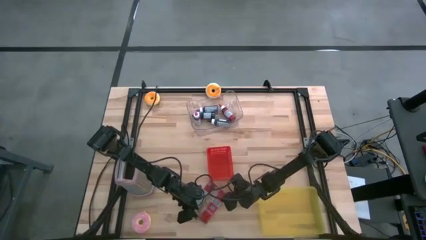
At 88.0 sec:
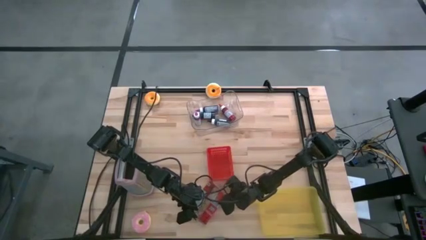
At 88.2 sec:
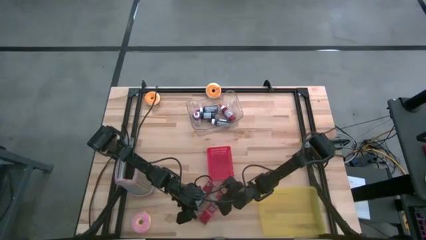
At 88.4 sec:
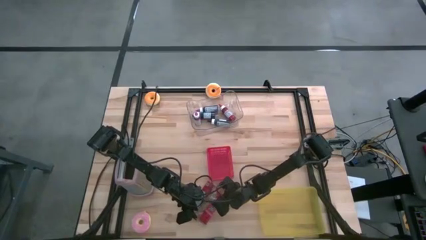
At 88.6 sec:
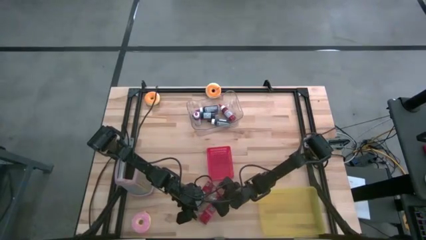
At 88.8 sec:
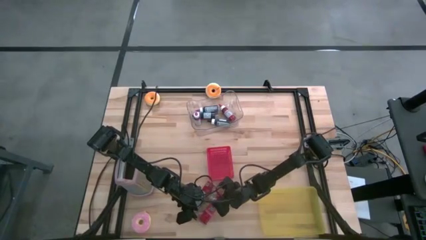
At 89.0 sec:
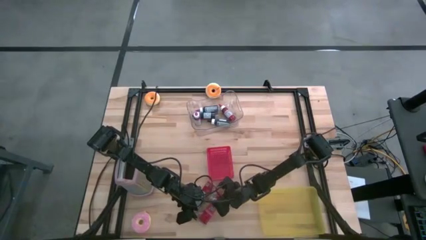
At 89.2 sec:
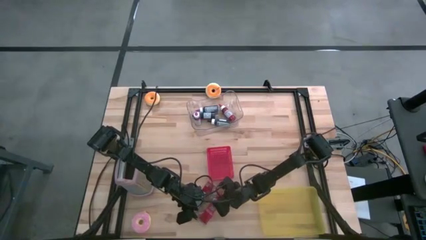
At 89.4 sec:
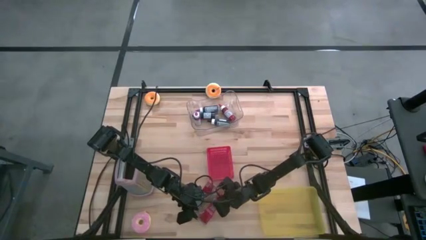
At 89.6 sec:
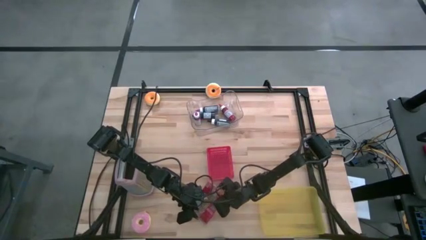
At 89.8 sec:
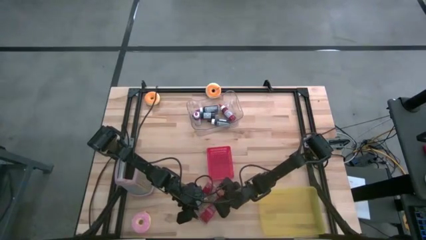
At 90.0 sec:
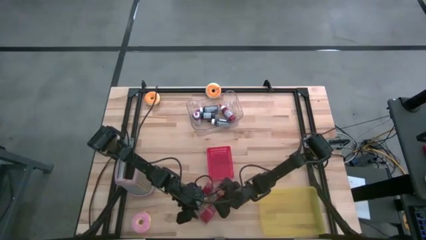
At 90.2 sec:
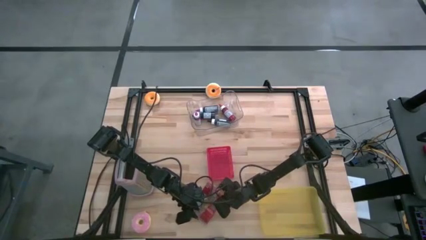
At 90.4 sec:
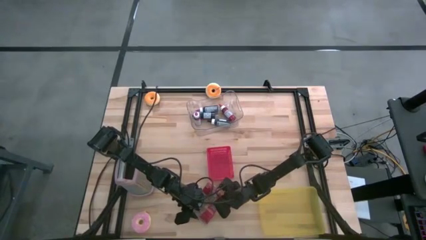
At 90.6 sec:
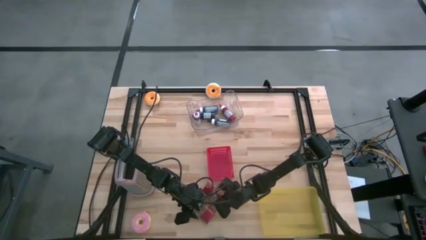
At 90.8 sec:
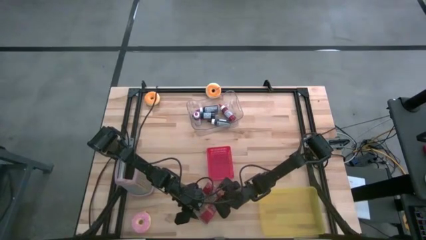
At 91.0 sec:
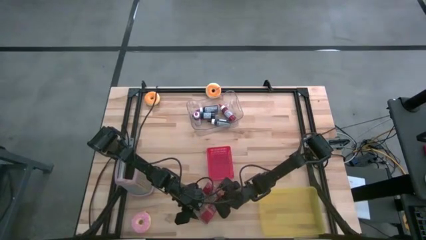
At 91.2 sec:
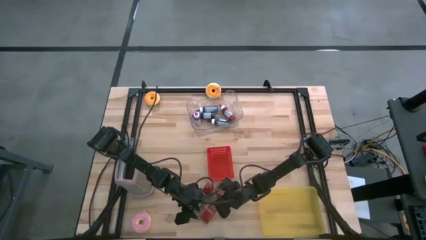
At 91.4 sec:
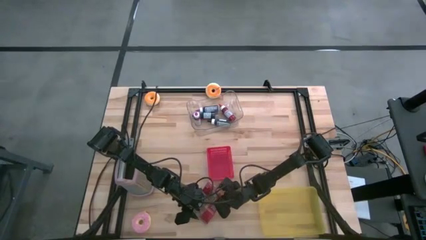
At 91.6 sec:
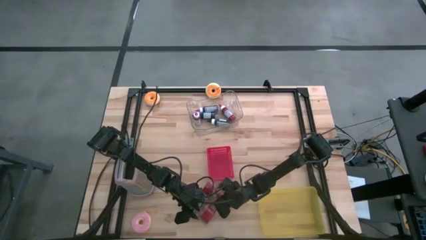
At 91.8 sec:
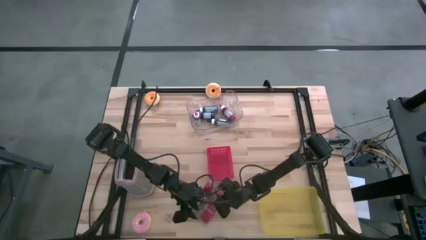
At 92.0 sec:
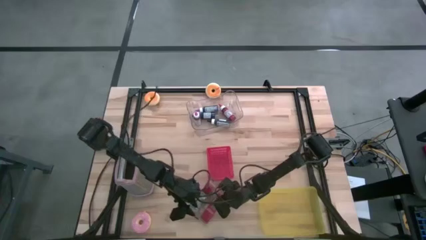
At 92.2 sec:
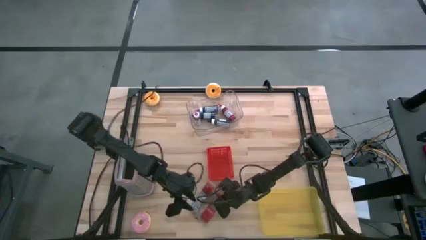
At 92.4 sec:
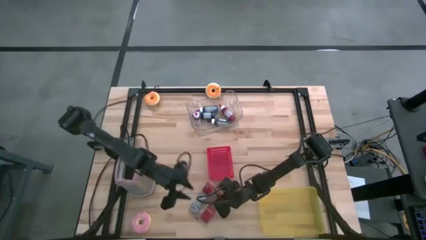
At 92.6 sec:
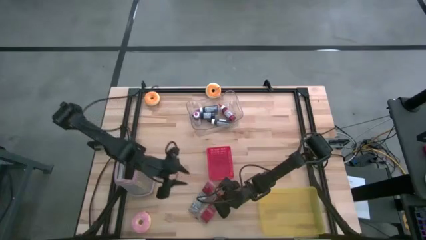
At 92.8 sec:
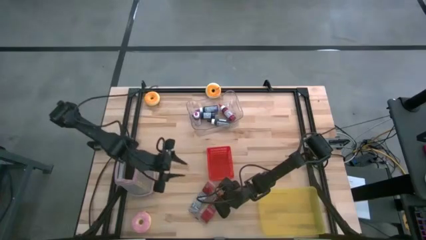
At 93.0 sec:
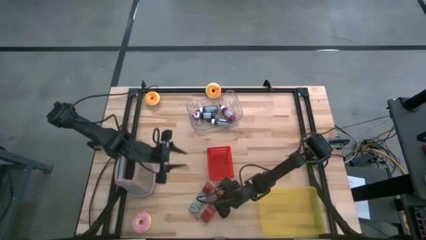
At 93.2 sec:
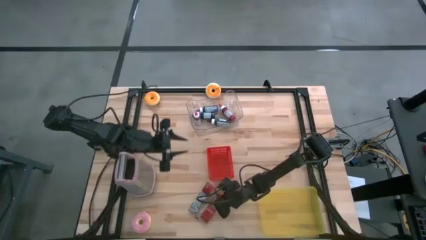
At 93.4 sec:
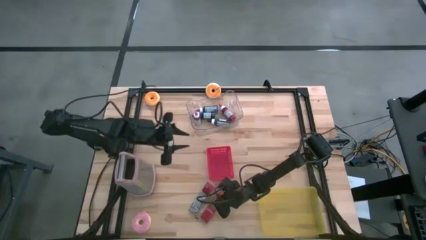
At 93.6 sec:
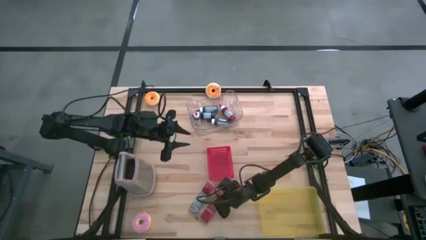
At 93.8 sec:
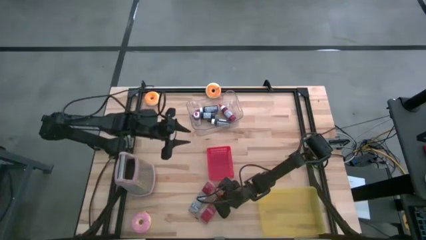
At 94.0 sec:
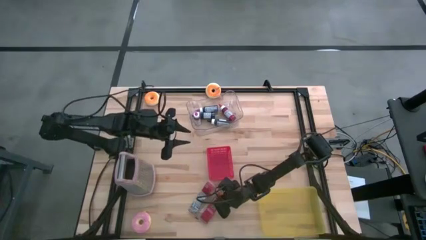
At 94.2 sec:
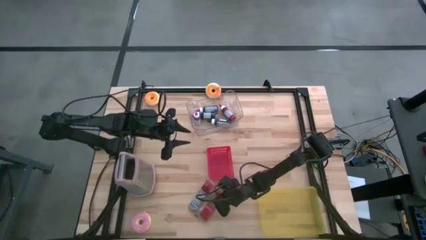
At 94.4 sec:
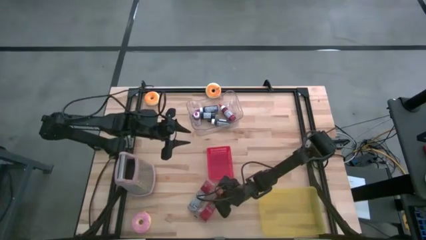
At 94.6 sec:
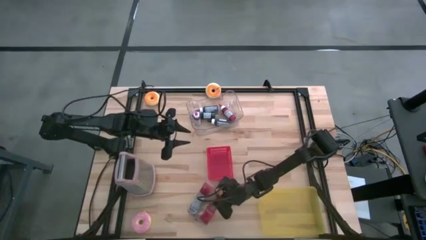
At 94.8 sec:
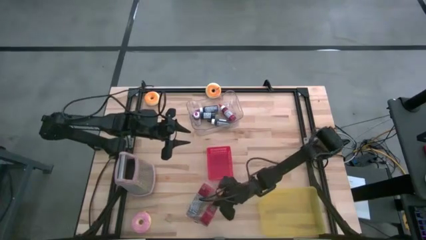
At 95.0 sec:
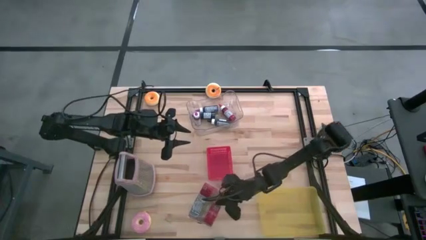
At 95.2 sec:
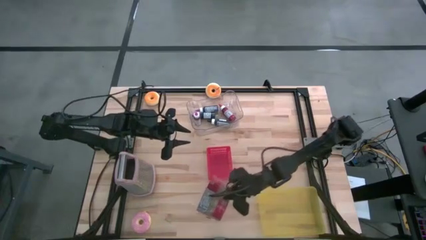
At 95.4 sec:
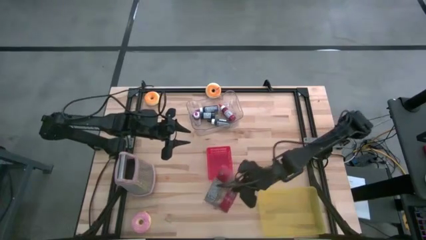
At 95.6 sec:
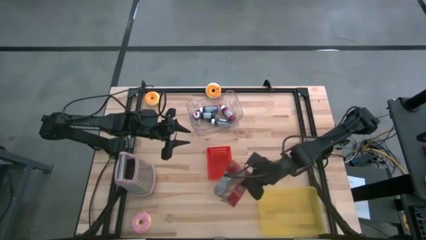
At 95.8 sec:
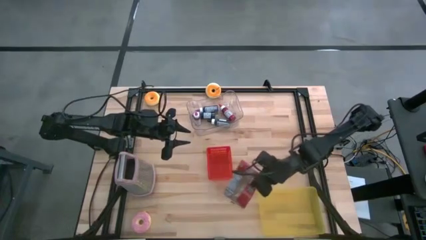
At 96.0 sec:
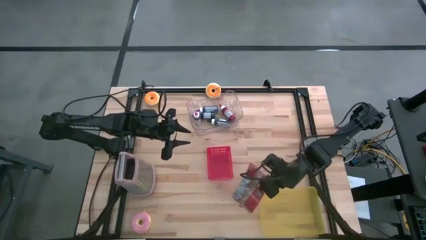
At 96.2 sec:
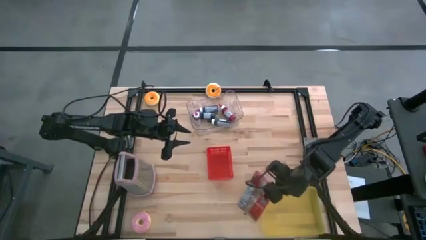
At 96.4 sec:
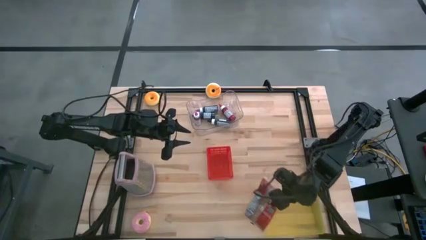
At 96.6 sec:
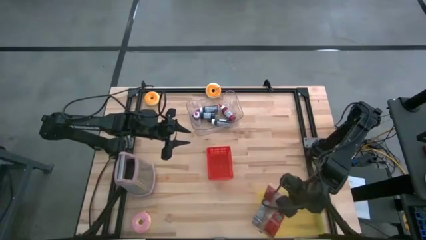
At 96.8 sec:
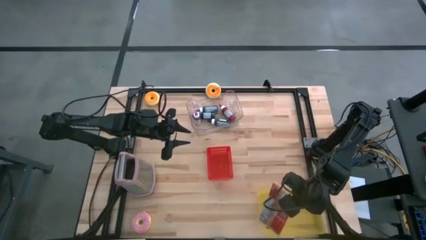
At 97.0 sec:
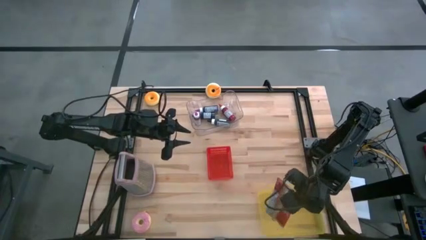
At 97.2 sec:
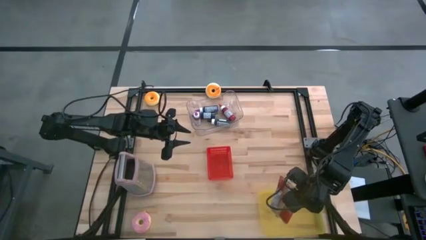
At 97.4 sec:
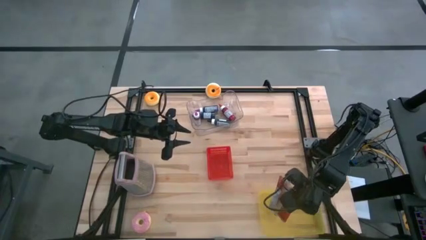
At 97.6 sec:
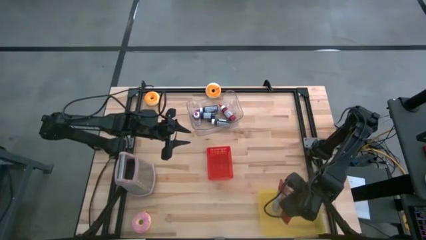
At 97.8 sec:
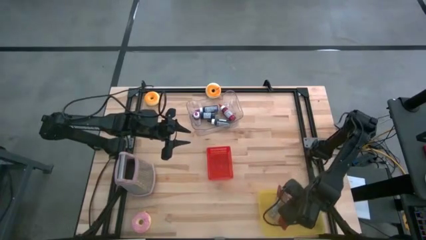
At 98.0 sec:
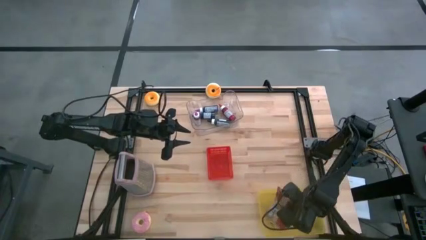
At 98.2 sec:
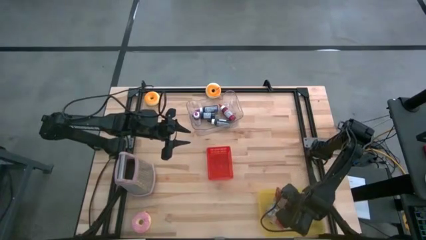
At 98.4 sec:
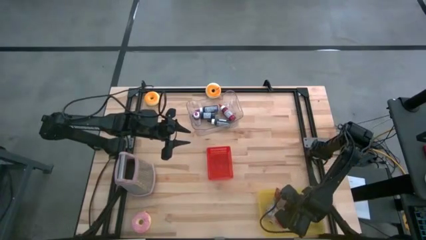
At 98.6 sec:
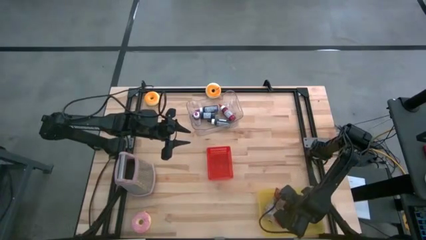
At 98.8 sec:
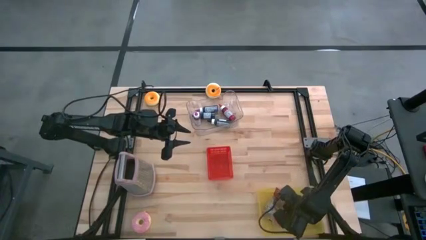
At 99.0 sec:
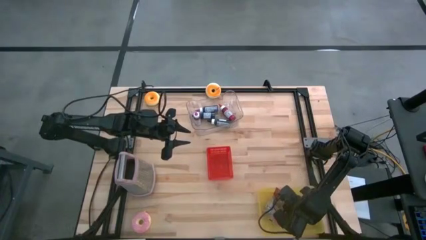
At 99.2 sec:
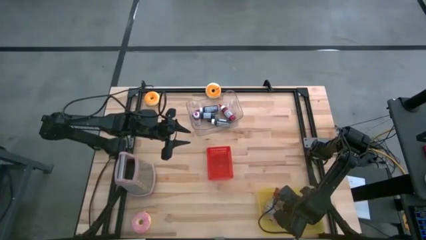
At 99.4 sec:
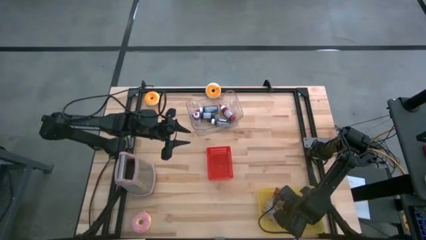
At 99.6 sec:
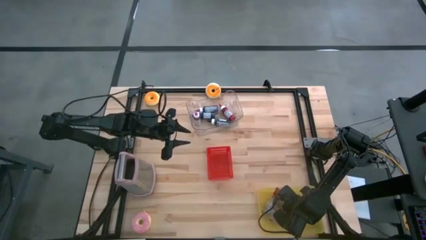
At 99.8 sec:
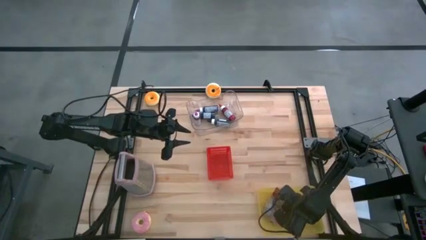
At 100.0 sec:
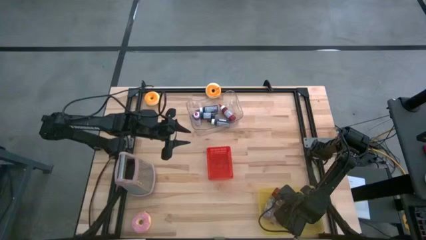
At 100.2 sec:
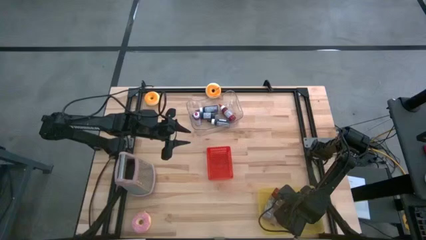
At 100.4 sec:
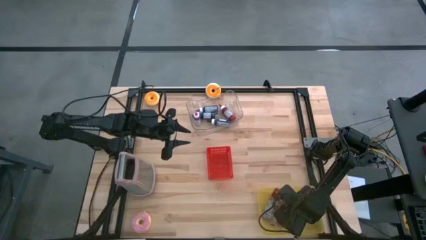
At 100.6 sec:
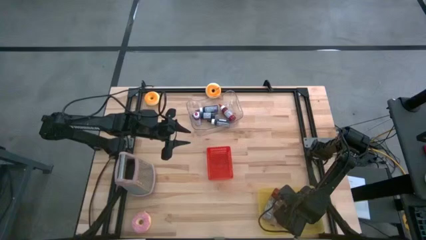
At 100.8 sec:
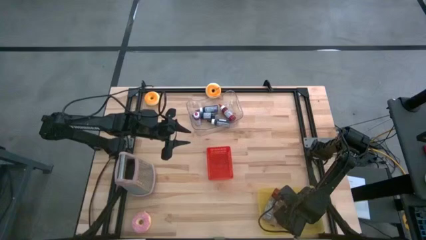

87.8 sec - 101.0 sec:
Task: Pick & Place Food Item
Put the red popcorn bag into the yellow bin

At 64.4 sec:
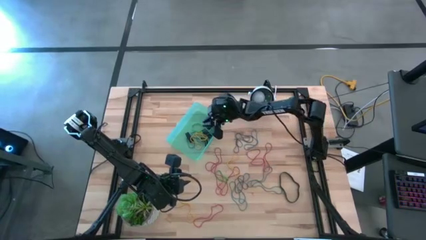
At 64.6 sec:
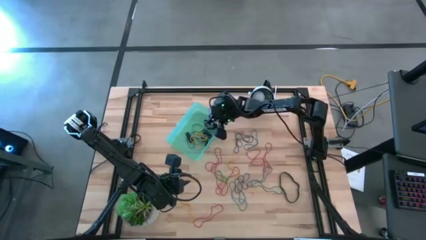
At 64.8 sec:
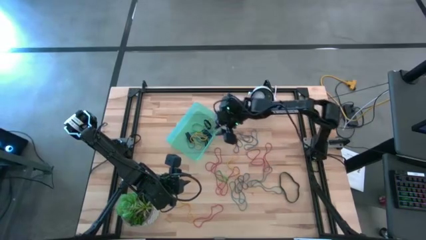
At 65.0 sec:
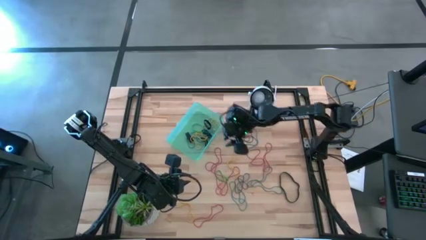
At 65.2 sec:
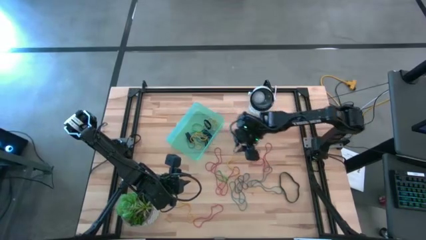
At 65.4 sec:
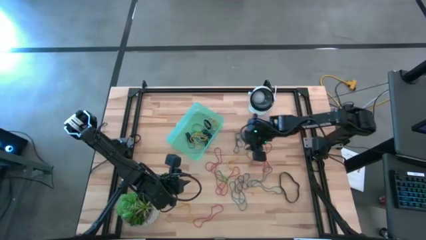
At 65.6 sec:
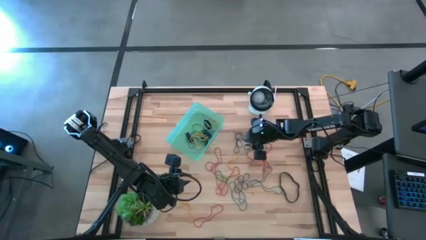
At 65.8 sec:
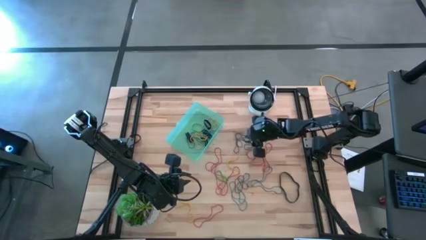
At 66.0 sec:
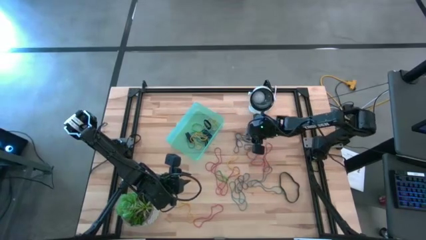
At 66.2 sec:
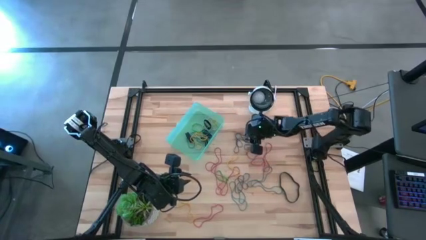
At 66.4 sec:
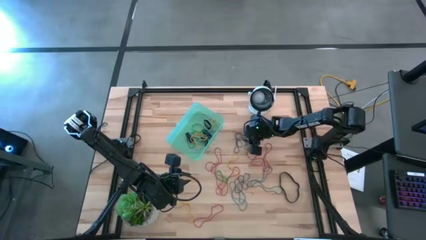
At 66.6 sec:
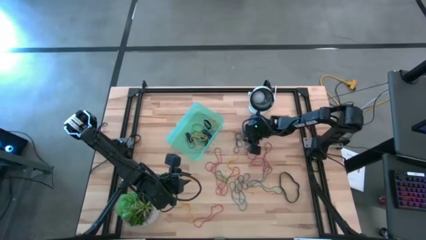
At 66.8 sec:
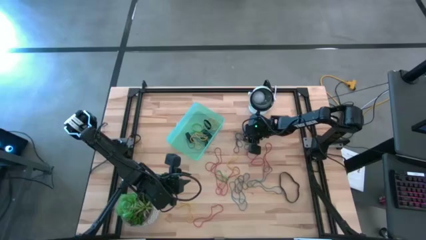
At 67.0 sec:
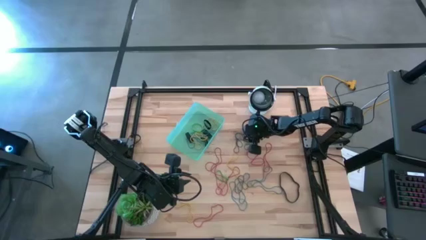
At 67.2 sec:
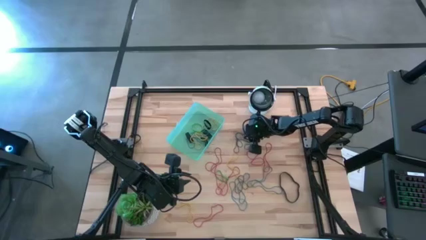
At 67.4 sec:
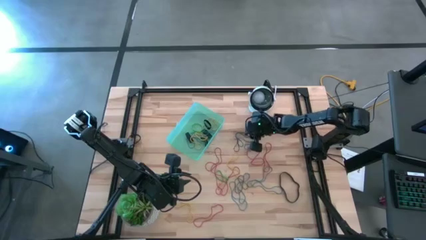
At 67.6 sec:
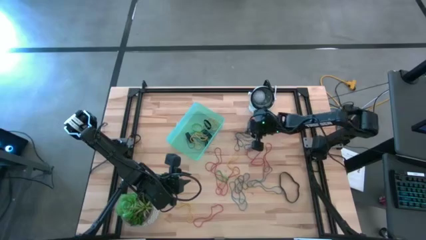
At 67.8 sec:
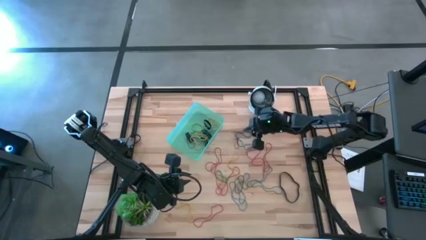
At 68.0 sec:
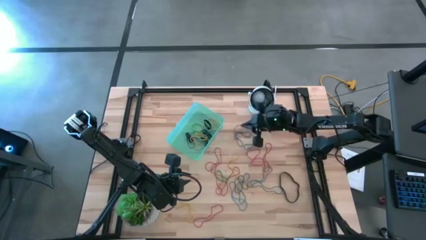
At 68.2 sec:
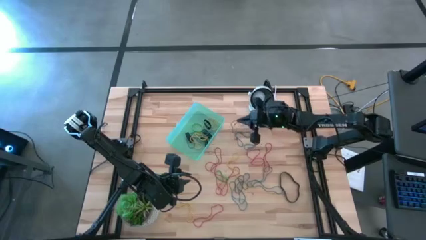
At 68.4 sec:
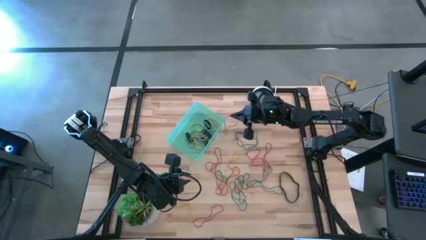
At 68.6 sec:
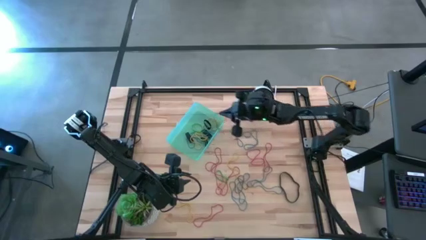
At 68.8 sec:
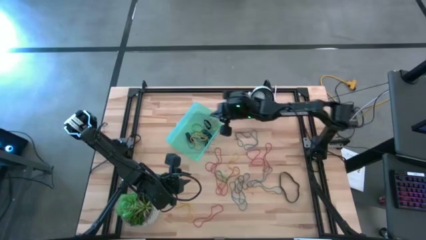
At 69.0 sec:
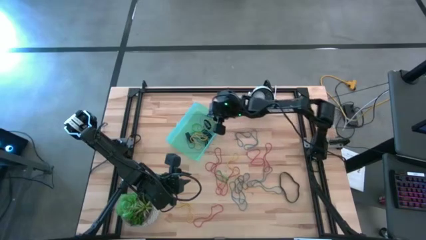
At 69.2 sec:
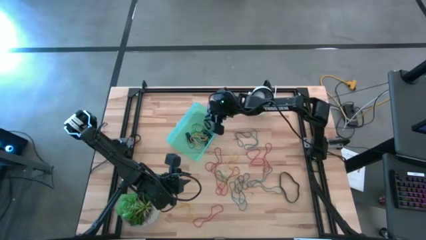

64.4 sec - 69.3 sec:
Task: Pick and place rubber bands into bin
Put the purple rubber band into the green bin
